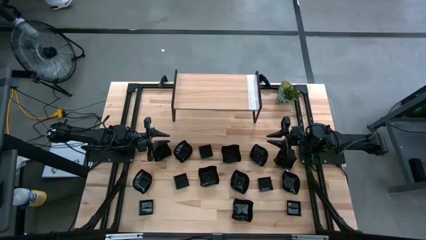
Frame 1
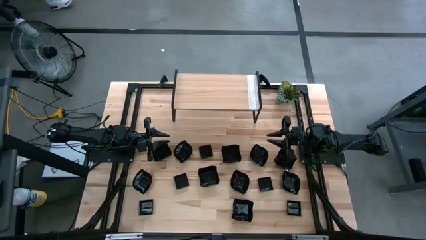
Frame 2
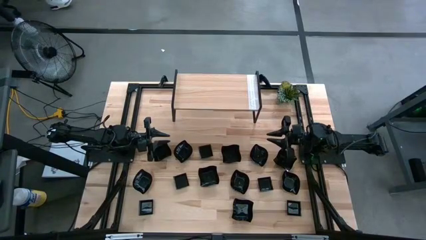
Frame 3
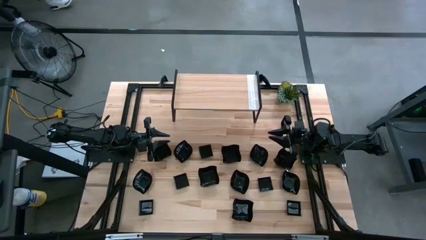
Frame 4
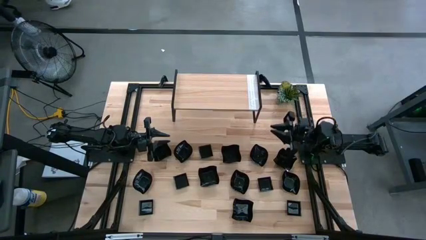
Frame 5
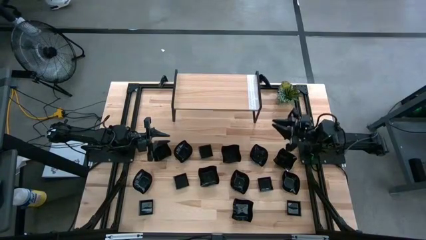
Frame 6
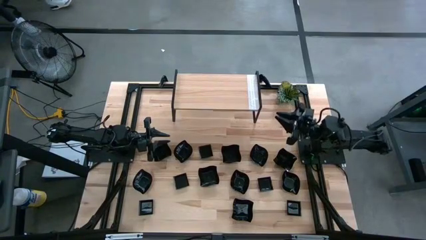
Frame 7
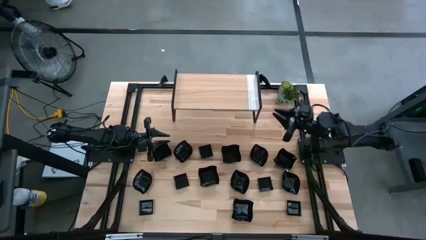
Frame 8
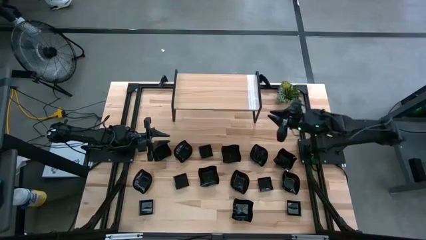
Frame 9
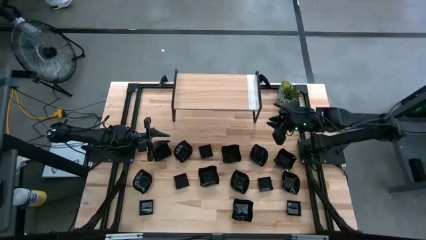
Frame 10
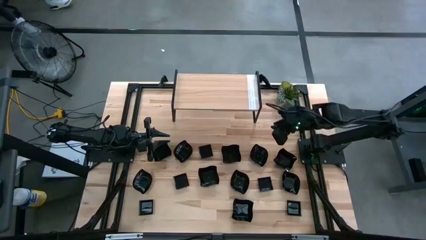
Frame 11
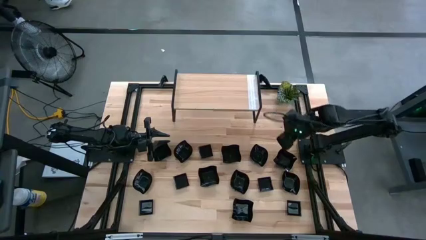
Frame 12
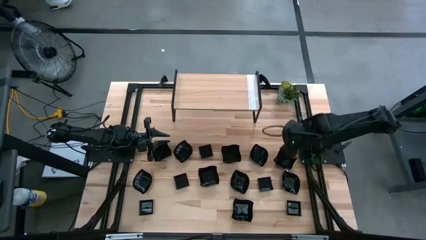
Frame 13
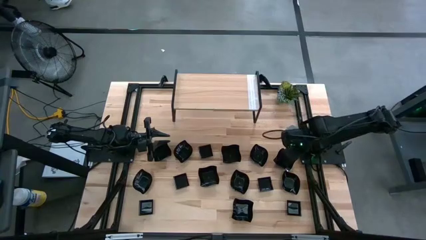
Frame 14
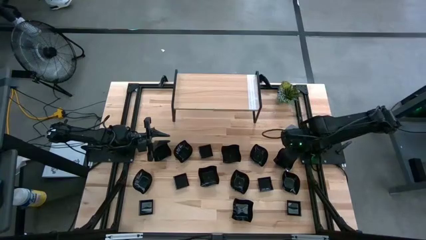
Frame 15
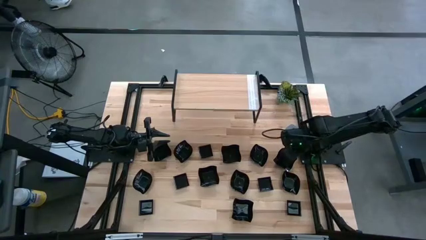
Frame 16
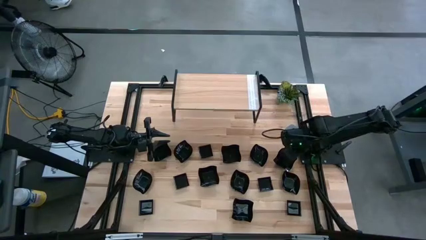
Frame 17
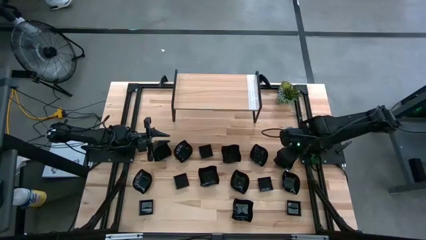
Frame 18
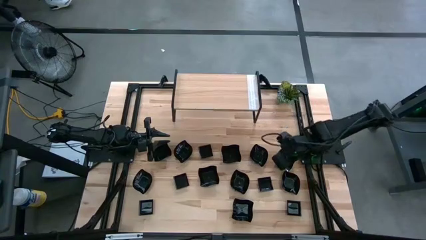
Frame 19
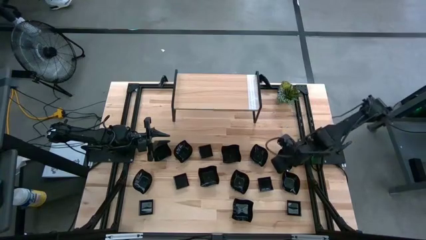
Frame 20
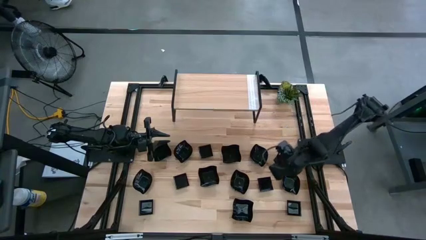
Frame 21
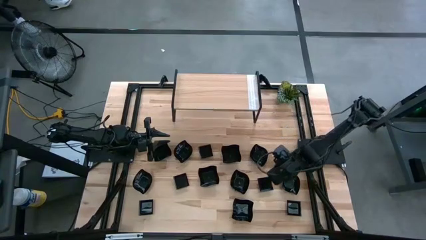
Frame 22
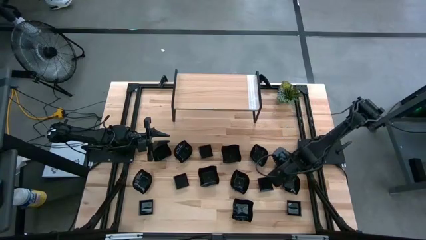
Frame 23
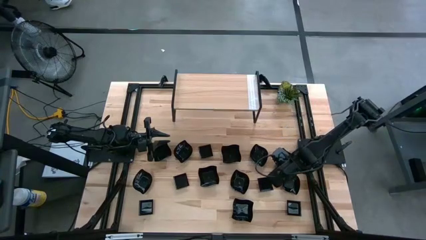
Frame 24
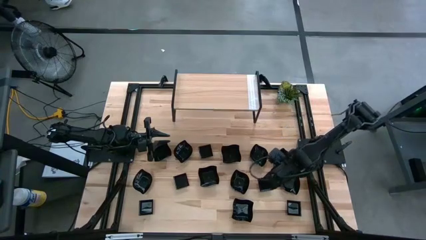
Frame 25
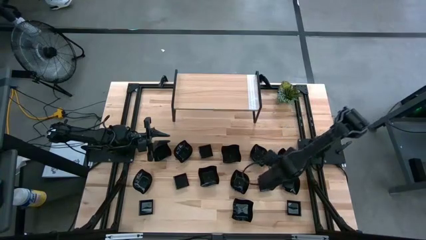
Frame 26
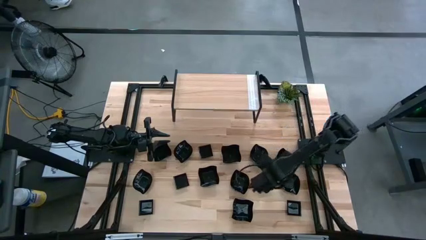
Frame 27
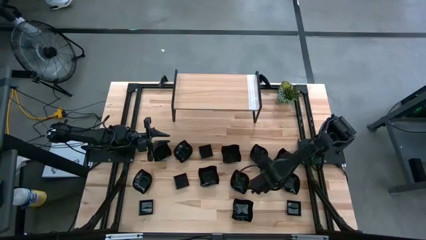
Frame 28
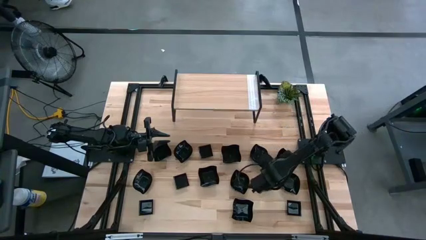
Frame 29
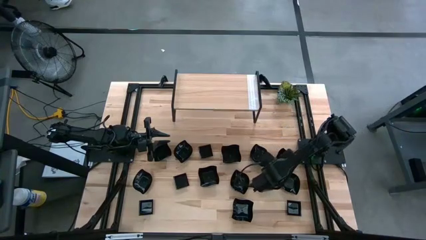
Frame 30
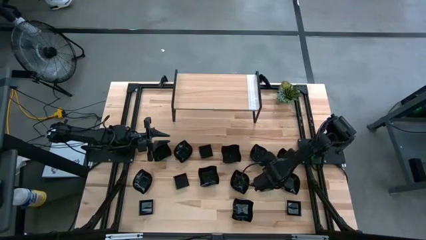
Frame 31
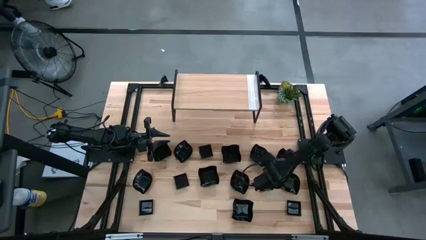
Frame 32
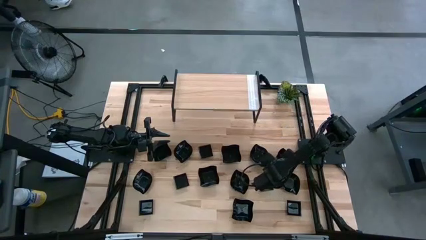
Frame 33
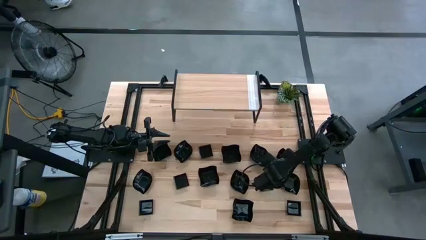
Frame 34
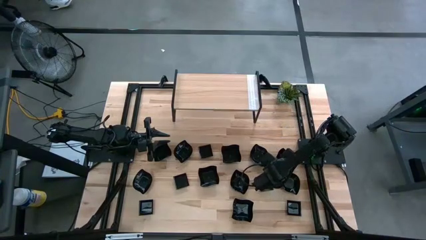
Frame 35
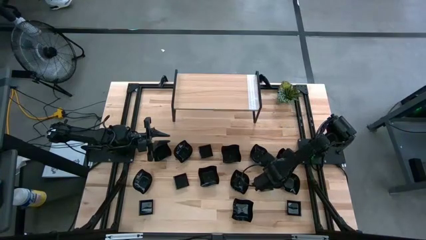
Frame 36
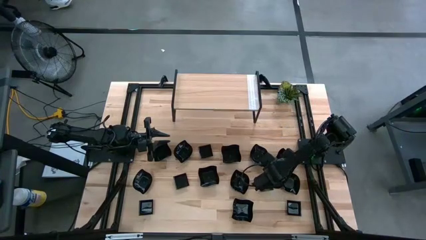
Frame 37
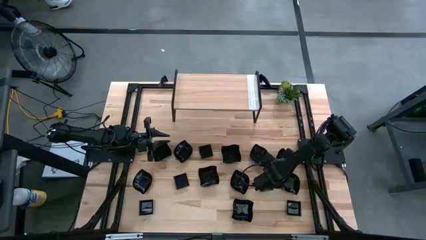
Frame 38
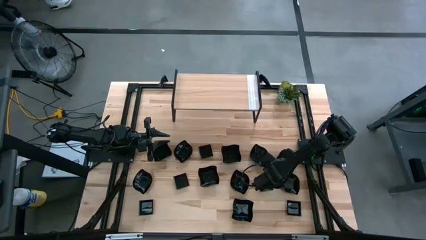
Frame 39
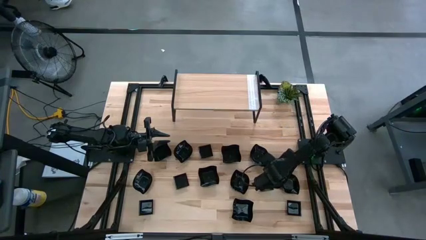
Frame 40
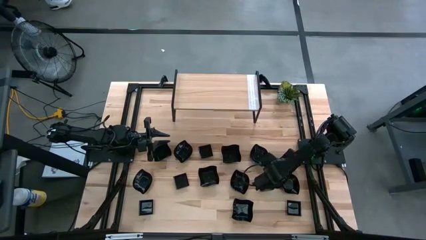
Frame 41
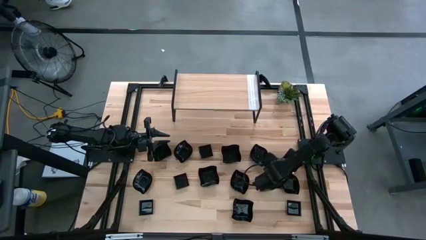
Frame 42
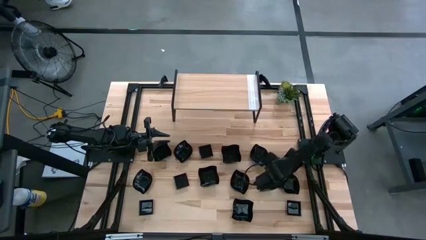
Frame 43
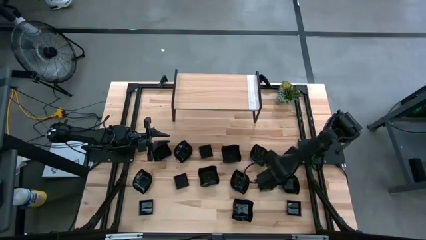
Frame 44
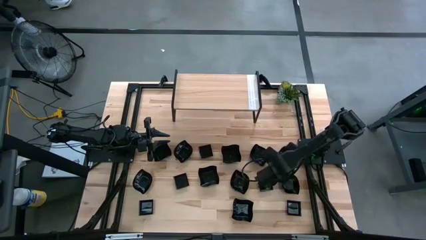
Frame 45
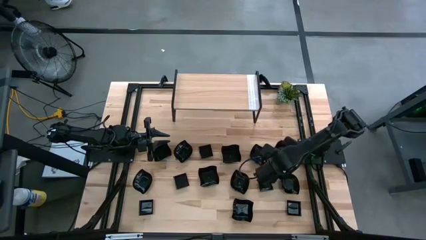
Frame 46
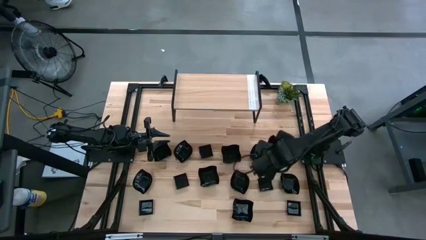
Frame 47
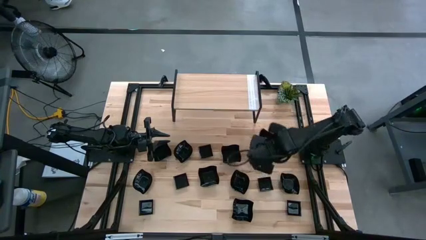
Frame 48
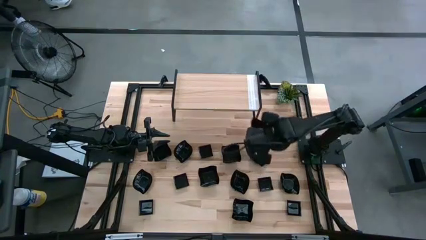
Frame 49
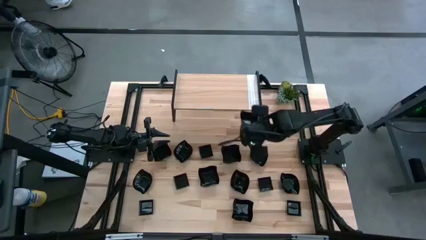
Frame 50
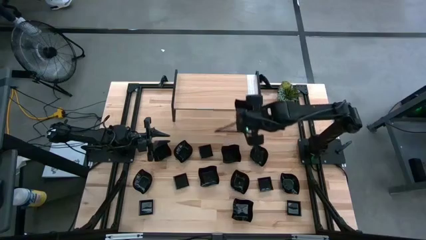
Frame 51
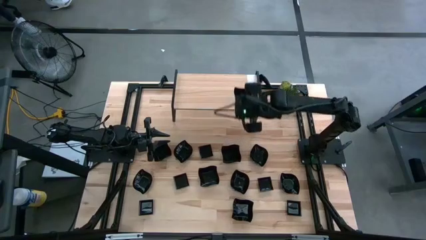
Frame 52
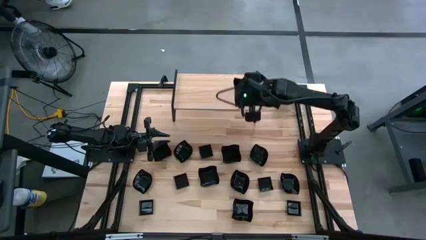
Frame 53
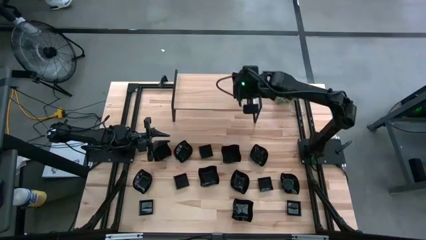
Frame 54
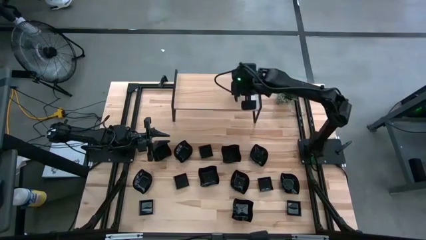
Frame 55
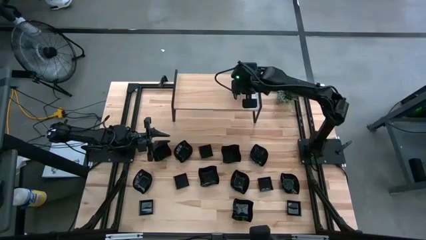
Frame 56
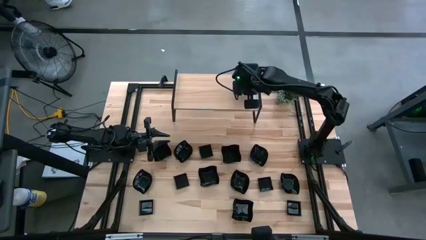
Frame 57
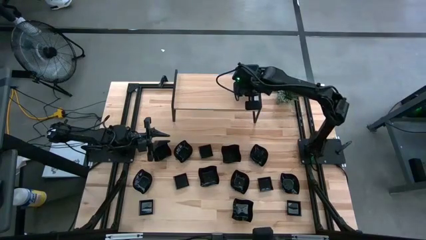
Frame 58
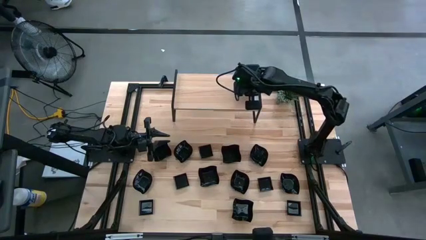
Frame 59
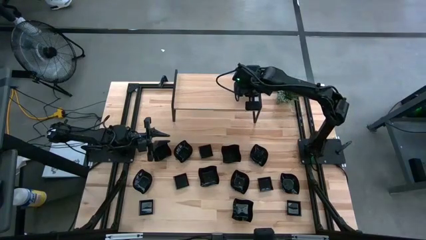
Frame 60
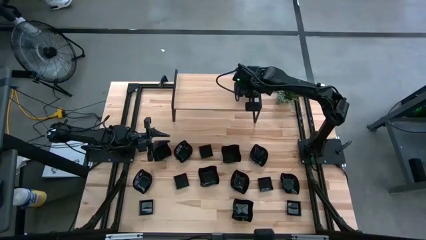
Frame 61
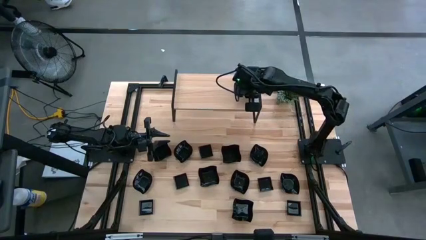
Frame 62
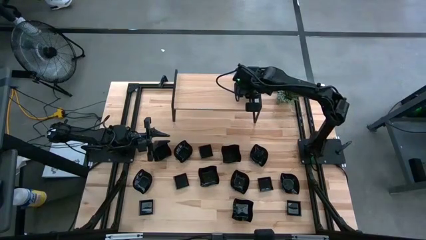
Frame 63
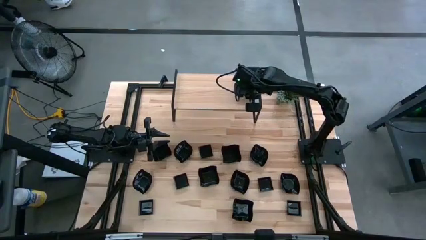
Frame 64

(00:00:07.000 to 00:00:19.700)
Task: Pick & Place Mini shaped plates
Put the distorted square plate on the shelf
